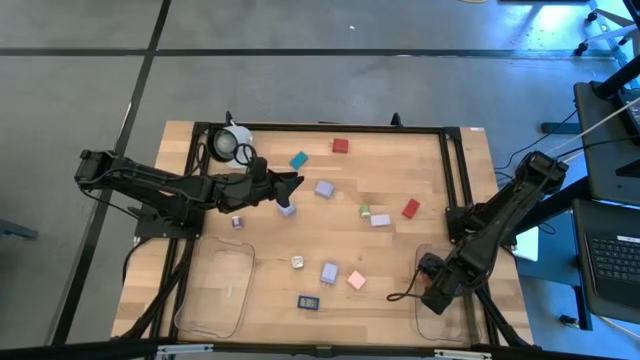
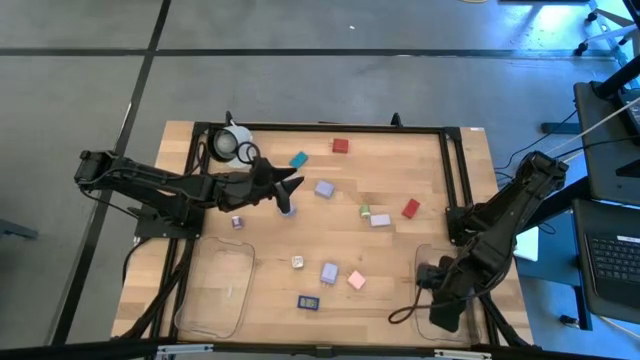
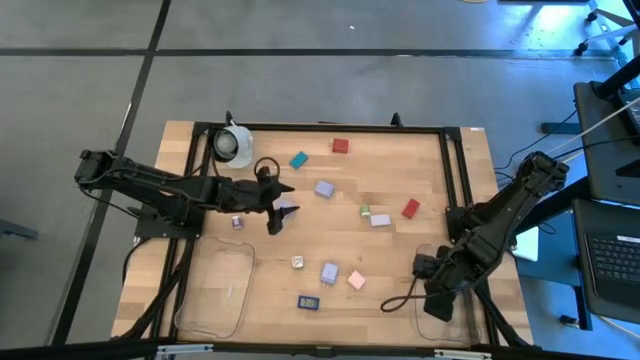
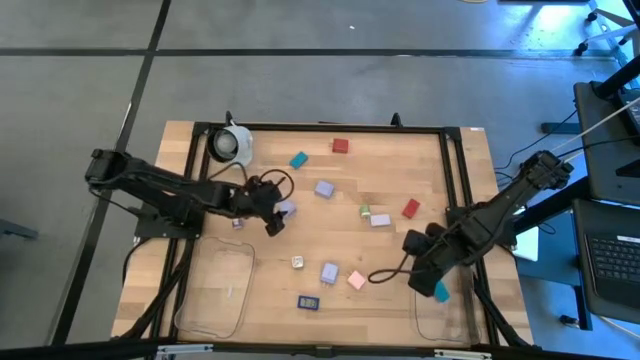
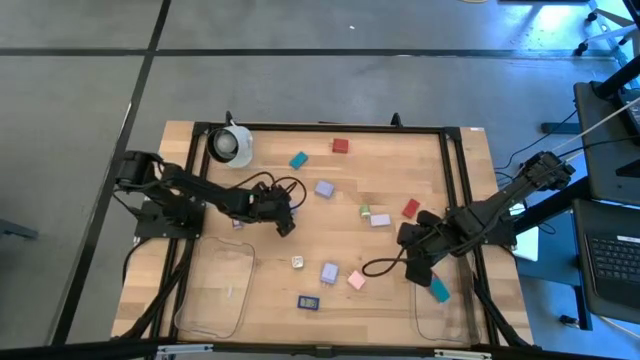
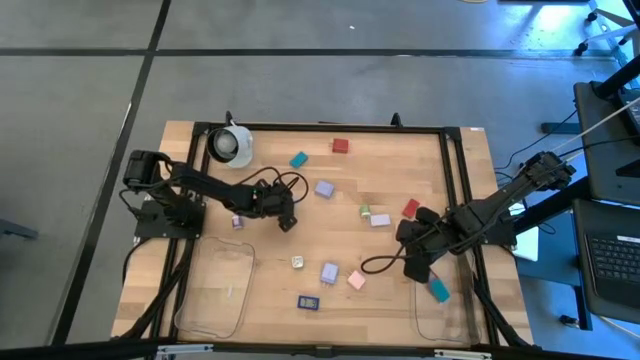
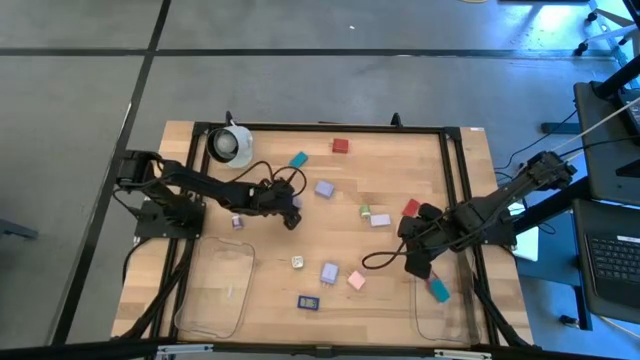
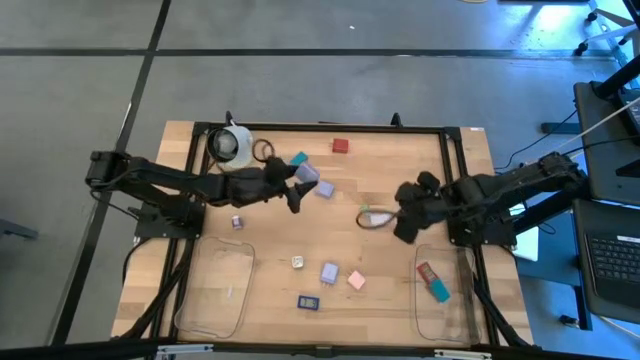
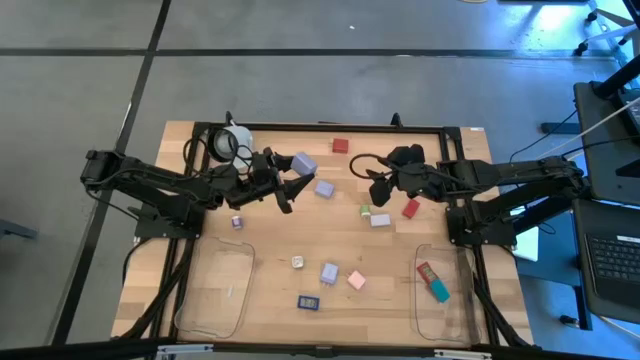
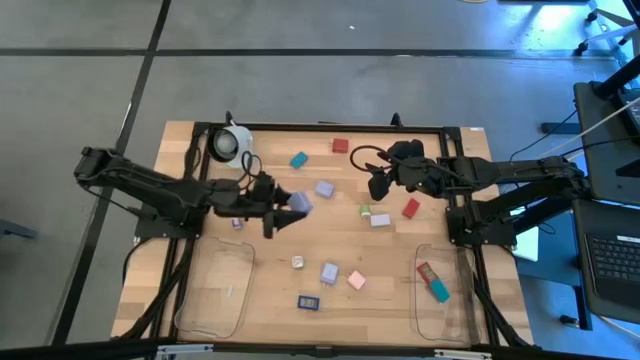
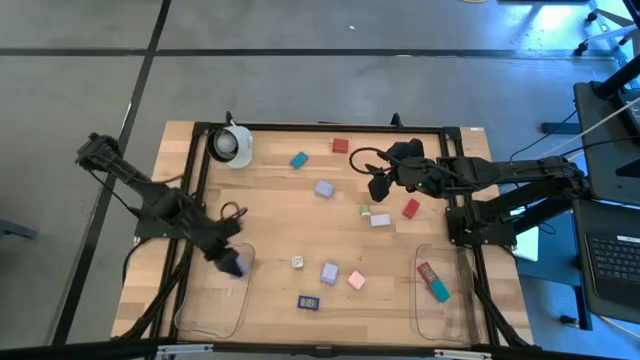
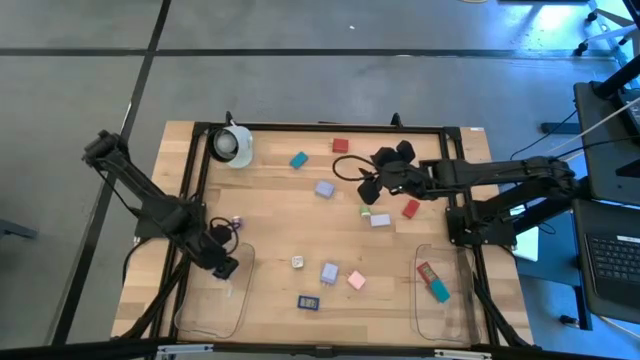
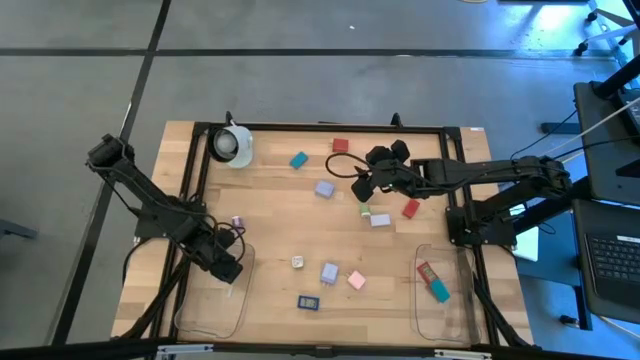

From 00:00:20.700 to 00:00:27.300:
Task: Pick & Place Office items
Put the top left purple adapter into the left transparent bin

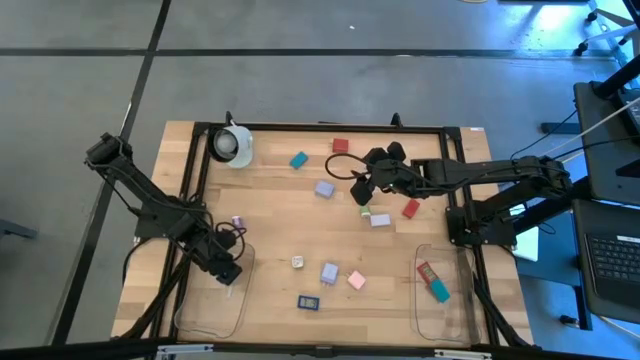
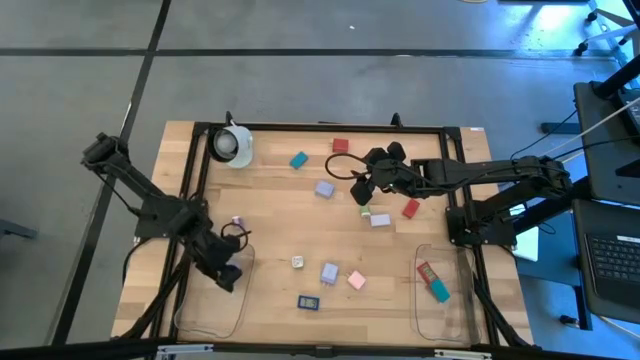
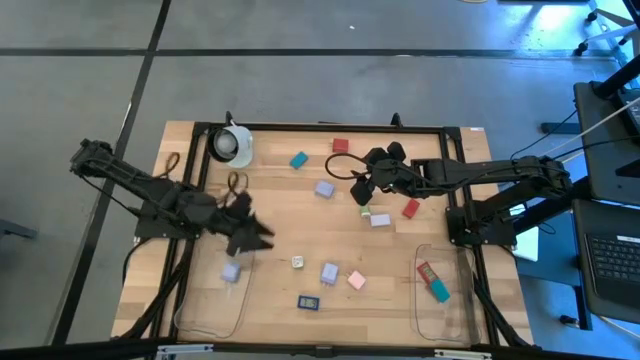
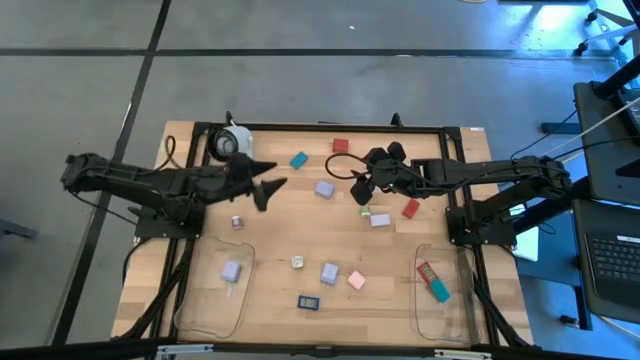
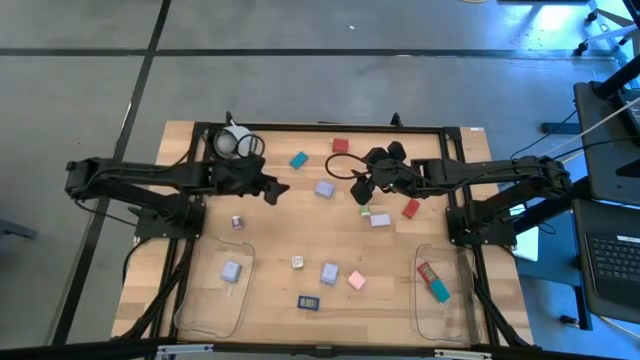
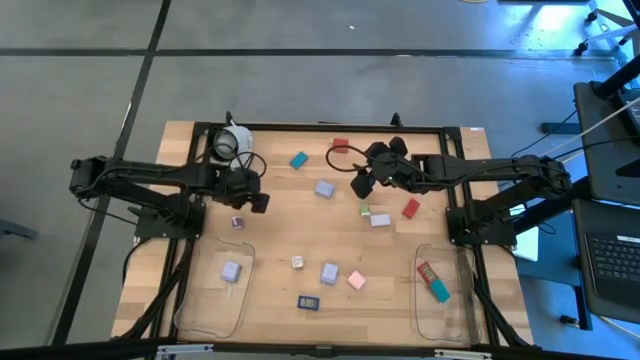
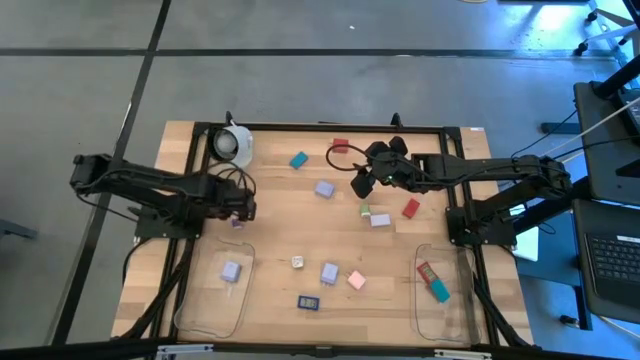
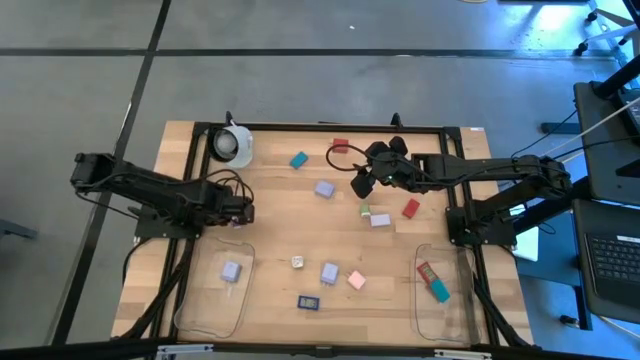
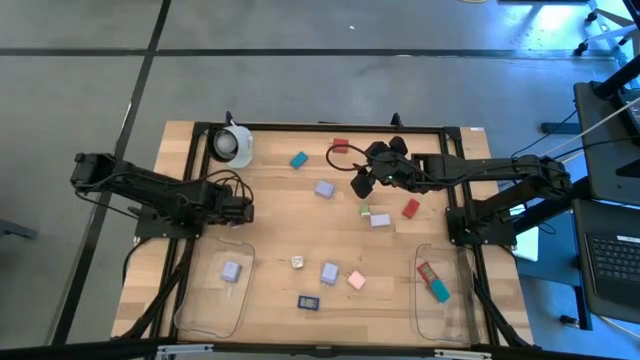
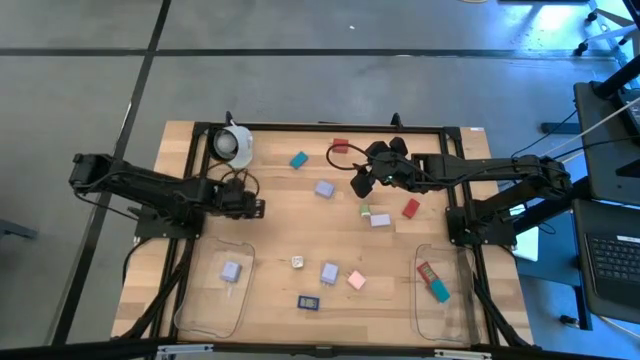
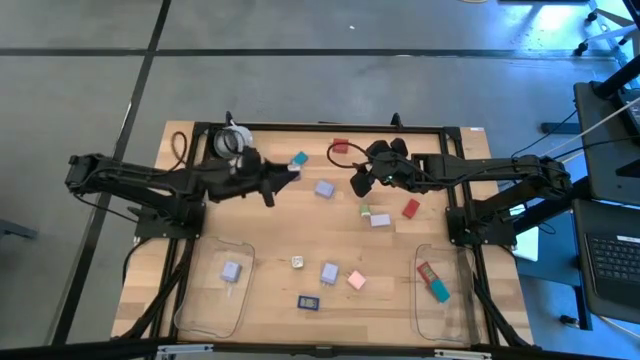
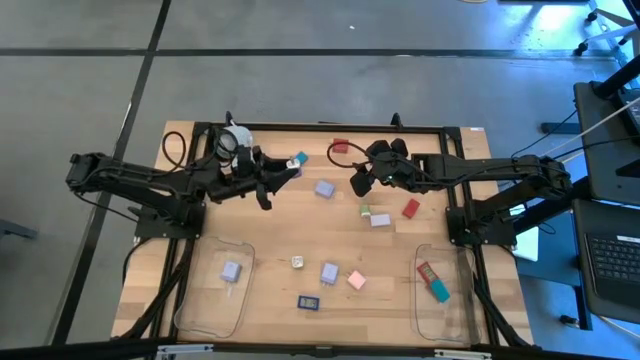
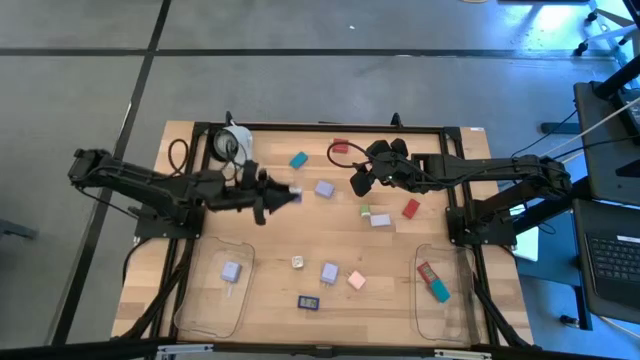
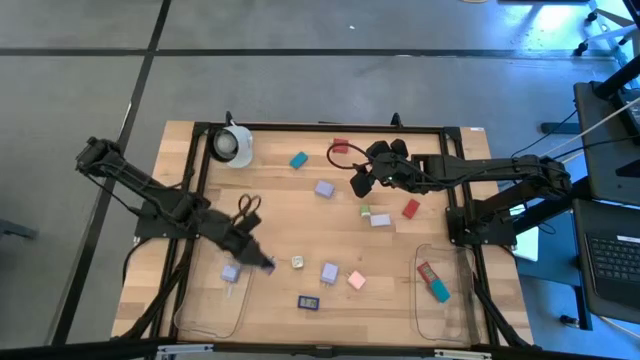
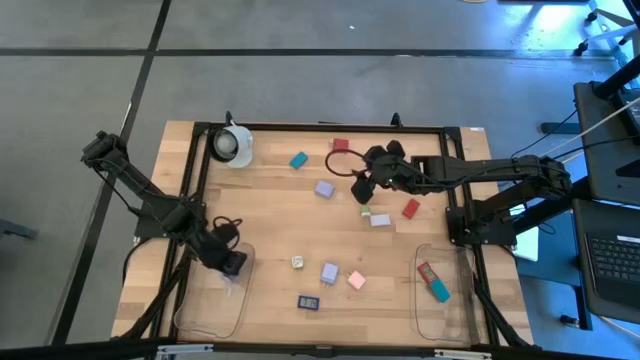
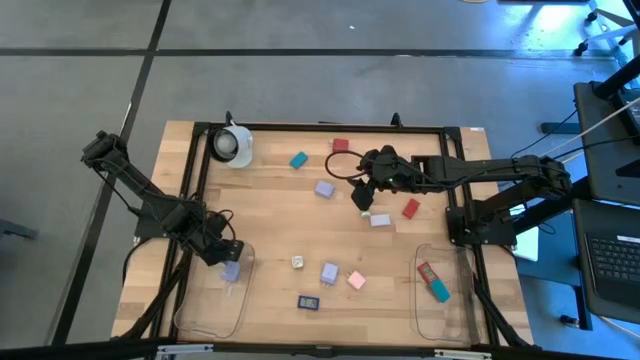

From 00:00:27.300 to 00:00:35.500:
Put the blue adapter into the left transparent bin

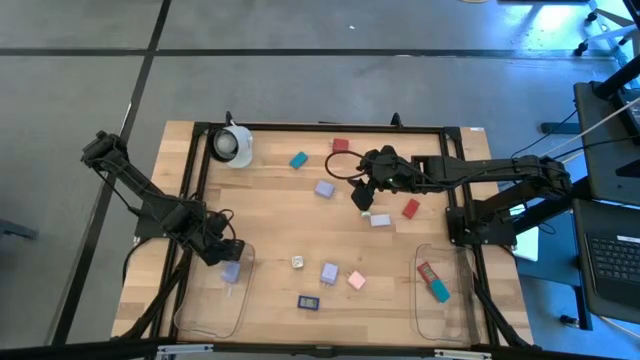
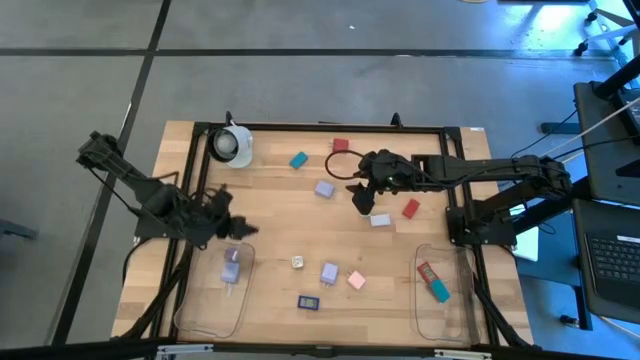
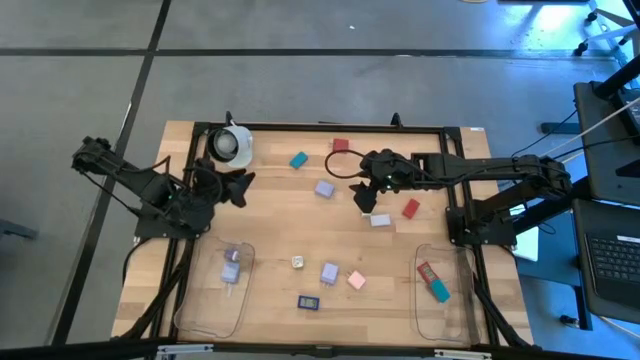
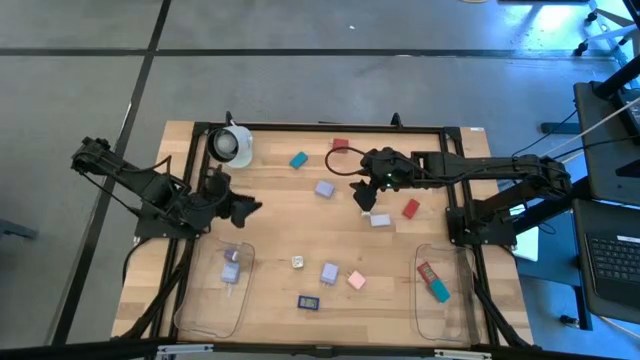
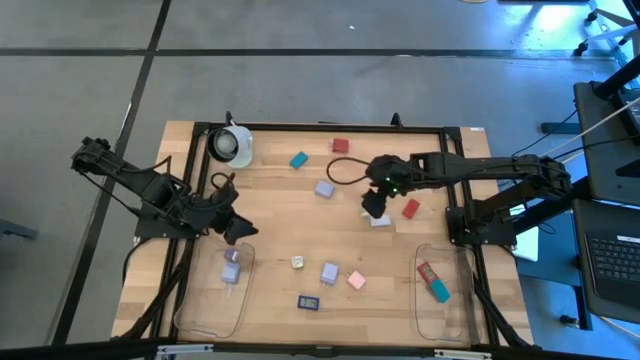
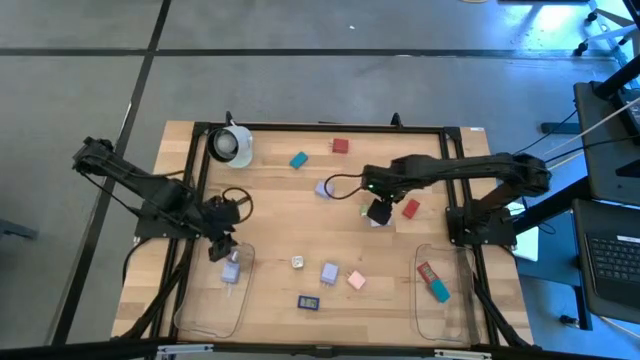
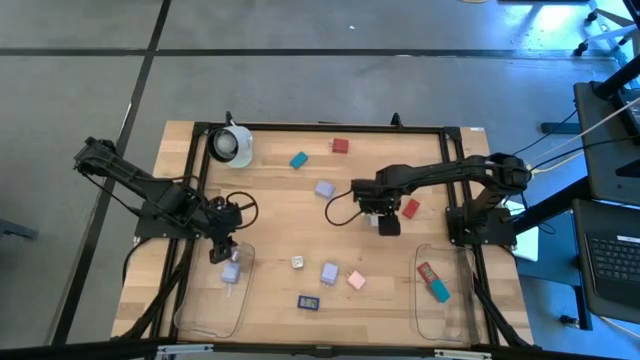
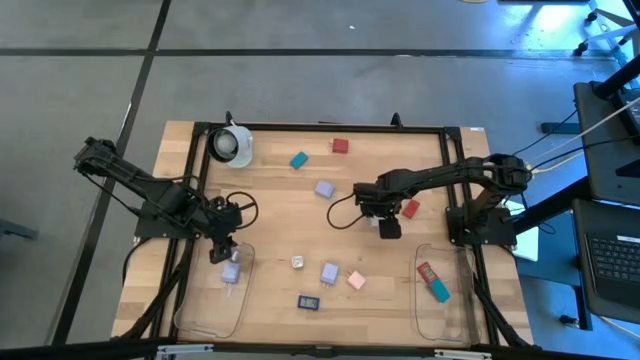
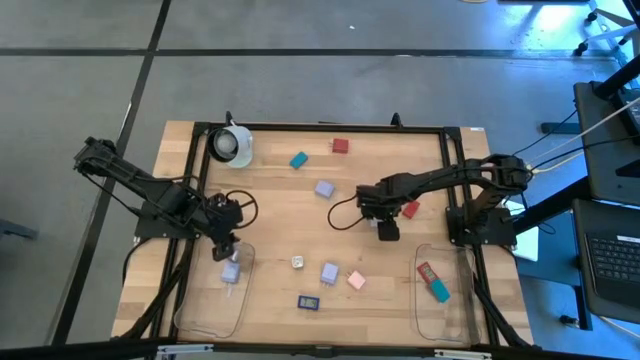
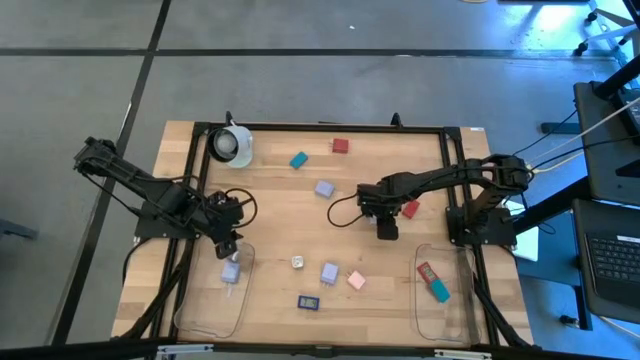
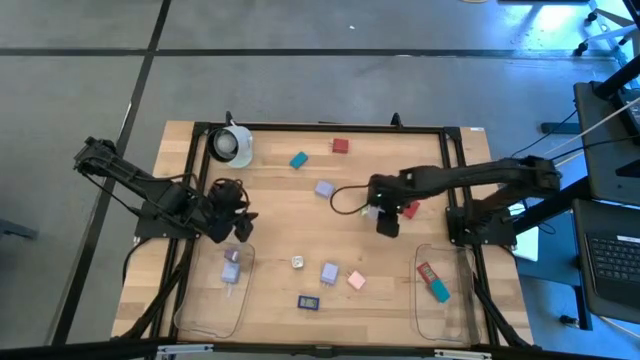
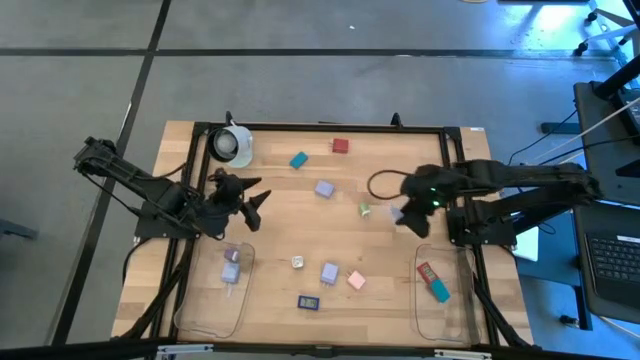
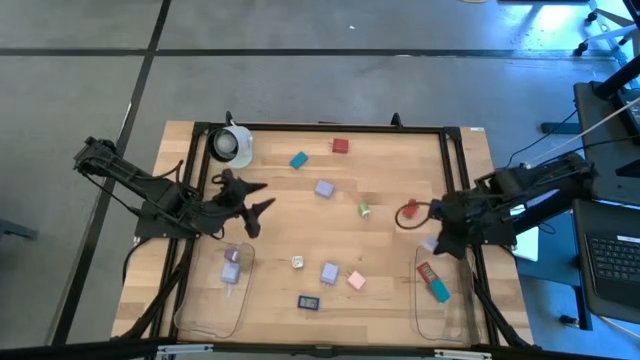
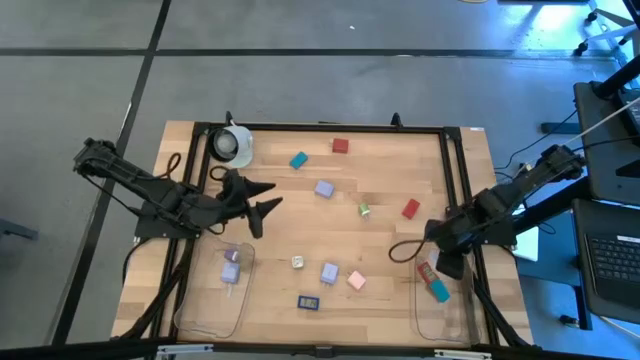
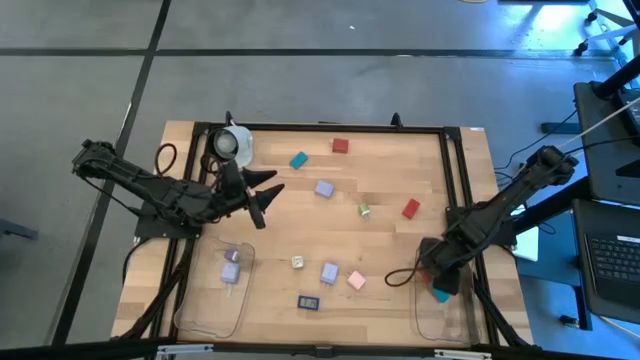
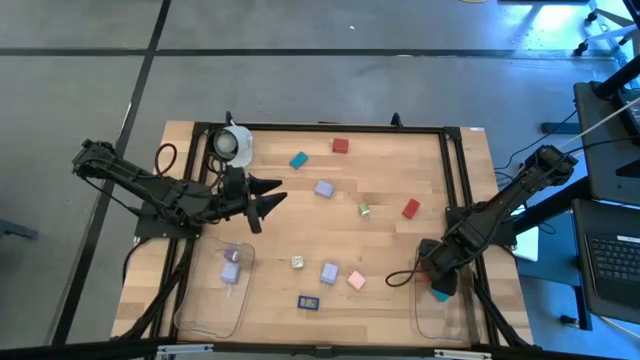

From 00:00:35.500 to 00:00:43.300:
Put the white timer into the right transparent bin
